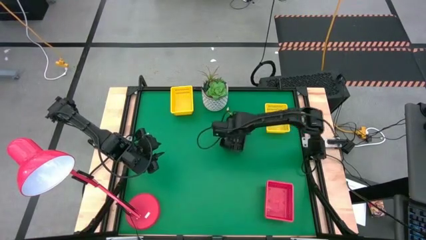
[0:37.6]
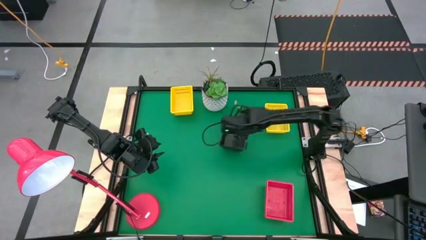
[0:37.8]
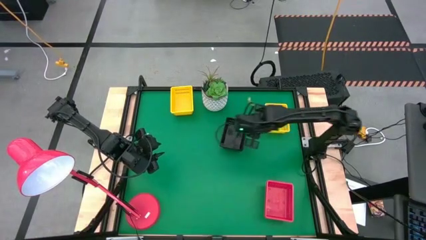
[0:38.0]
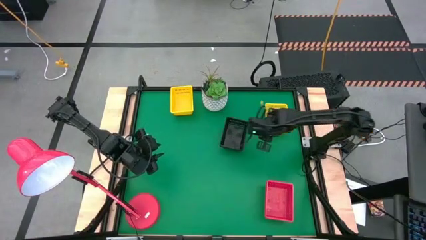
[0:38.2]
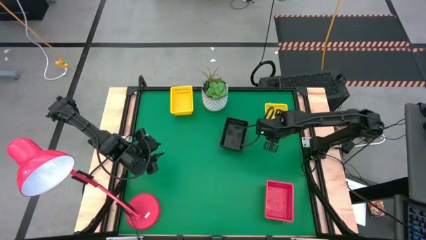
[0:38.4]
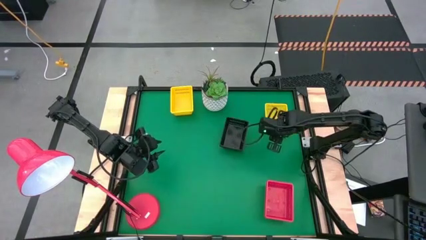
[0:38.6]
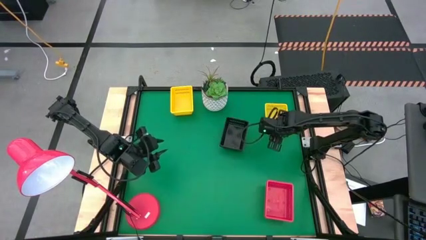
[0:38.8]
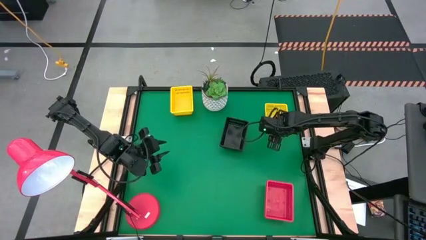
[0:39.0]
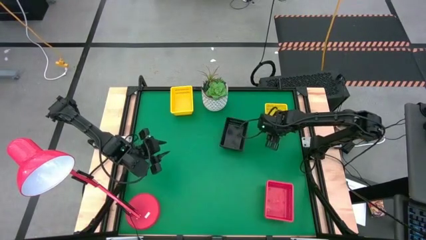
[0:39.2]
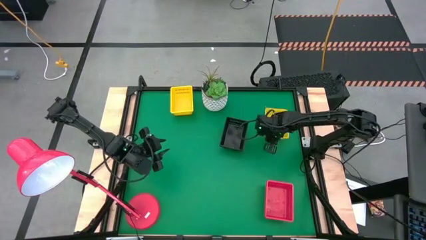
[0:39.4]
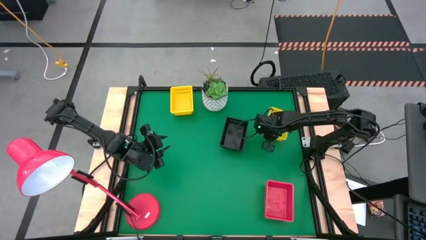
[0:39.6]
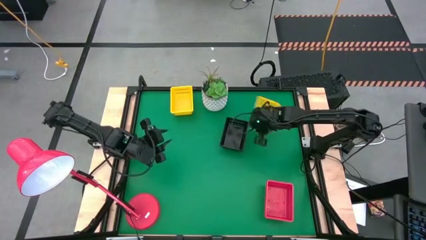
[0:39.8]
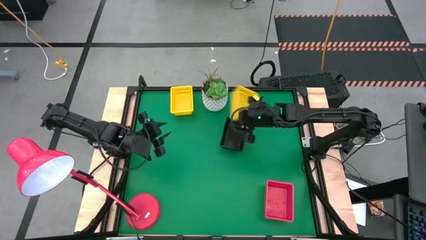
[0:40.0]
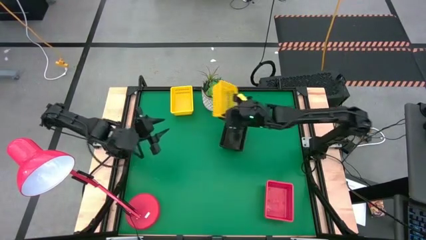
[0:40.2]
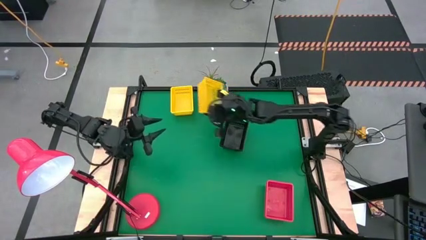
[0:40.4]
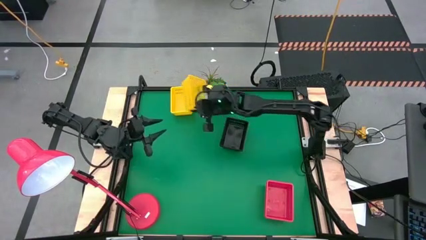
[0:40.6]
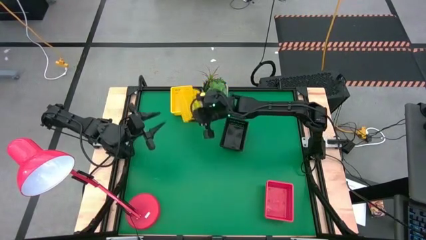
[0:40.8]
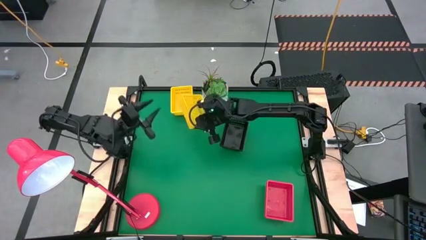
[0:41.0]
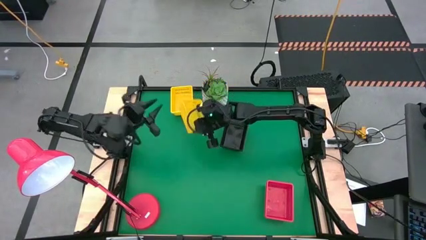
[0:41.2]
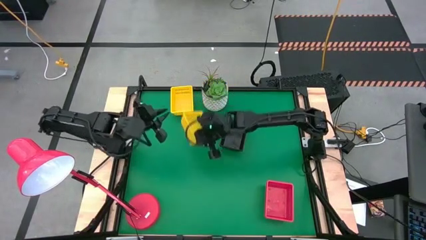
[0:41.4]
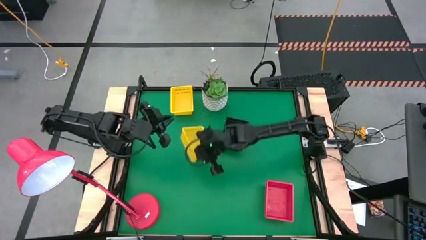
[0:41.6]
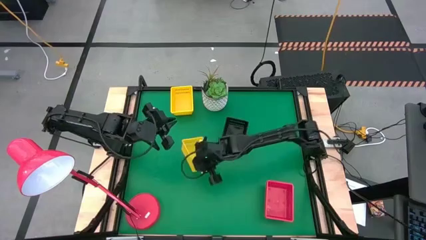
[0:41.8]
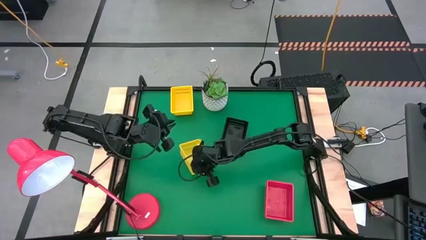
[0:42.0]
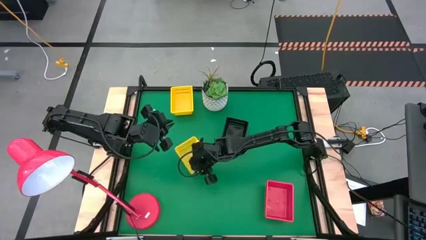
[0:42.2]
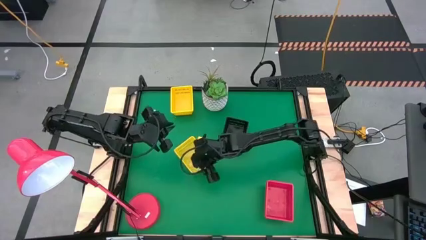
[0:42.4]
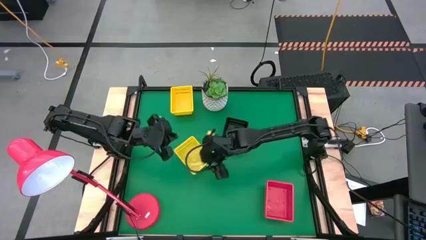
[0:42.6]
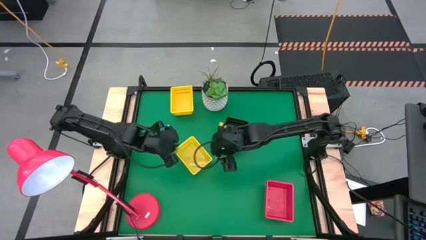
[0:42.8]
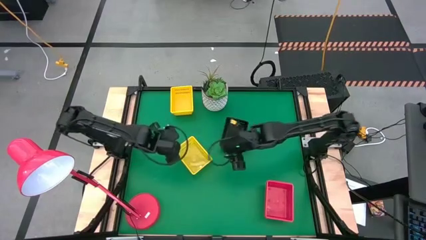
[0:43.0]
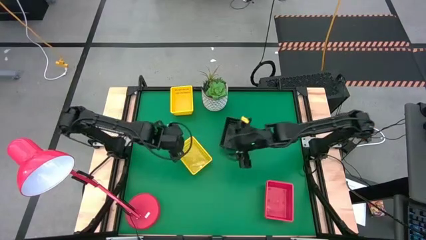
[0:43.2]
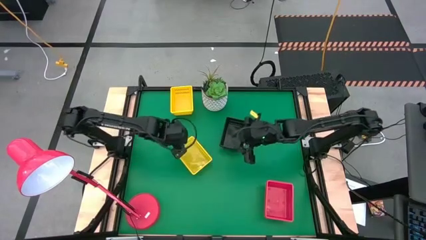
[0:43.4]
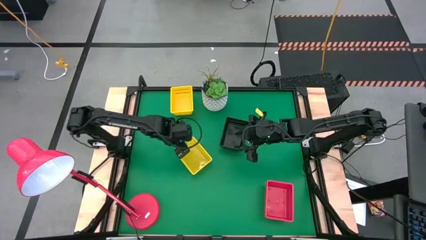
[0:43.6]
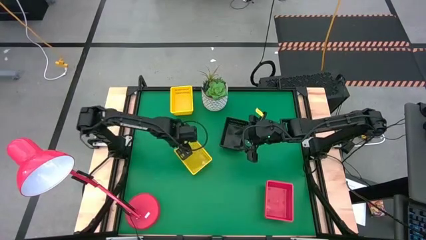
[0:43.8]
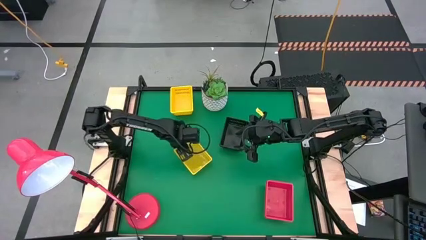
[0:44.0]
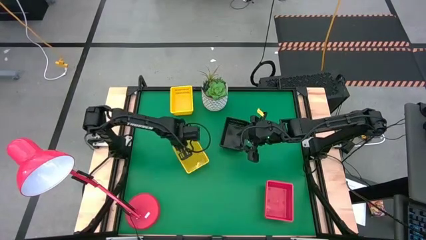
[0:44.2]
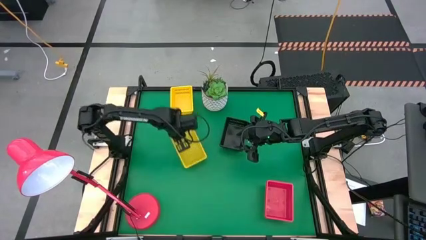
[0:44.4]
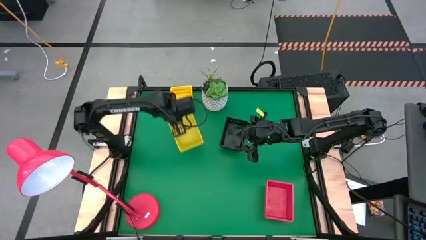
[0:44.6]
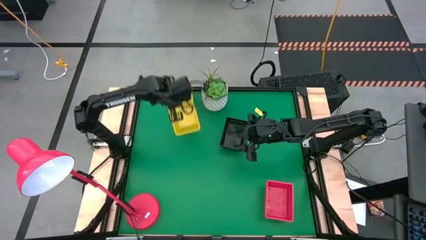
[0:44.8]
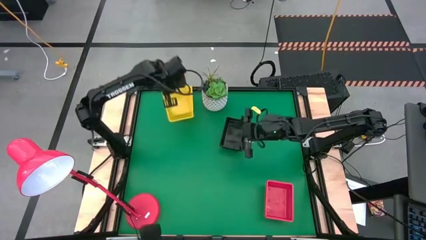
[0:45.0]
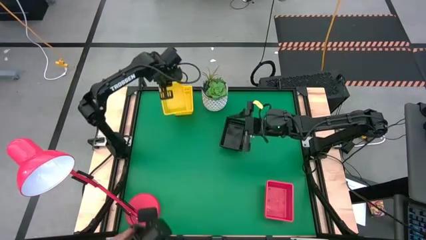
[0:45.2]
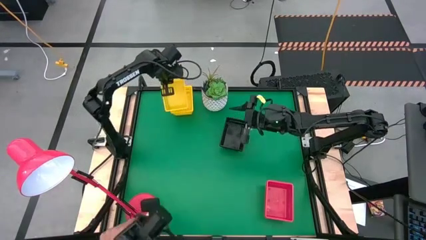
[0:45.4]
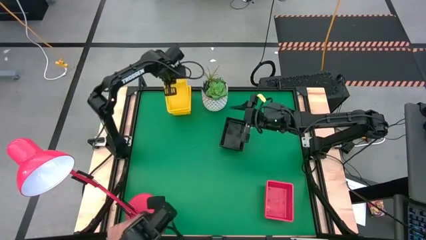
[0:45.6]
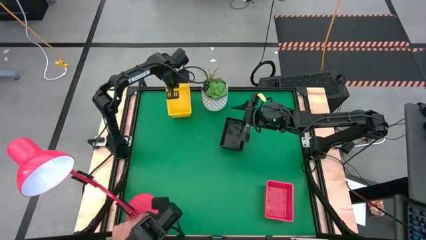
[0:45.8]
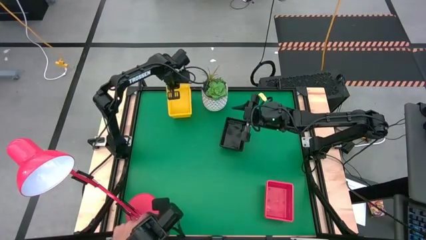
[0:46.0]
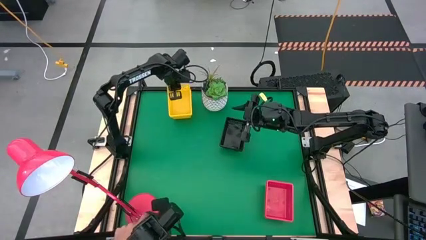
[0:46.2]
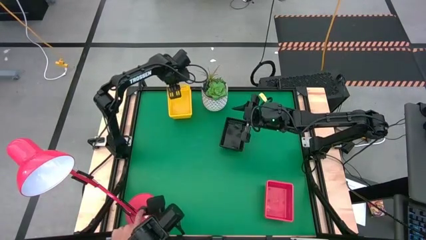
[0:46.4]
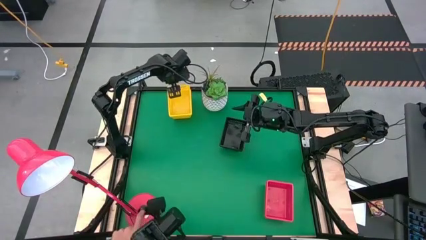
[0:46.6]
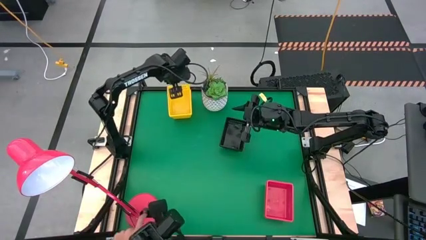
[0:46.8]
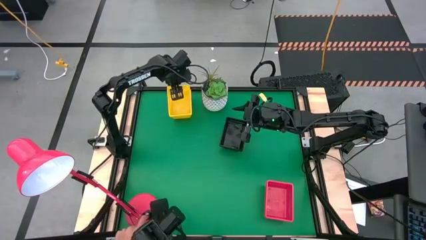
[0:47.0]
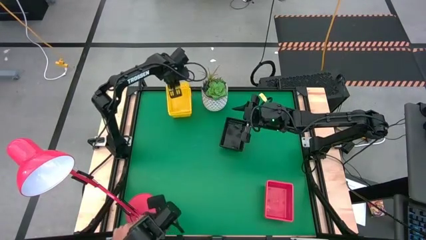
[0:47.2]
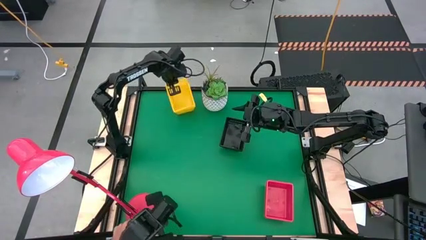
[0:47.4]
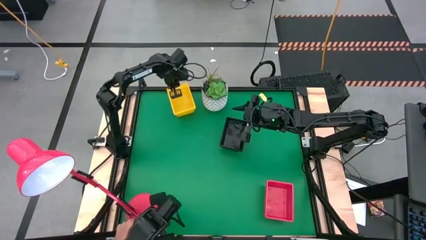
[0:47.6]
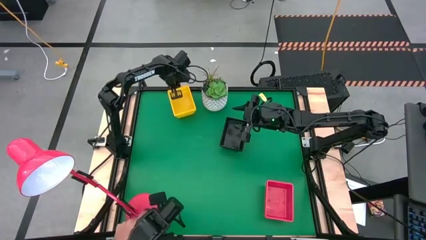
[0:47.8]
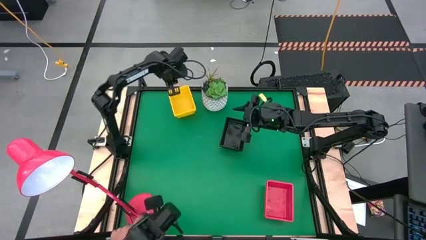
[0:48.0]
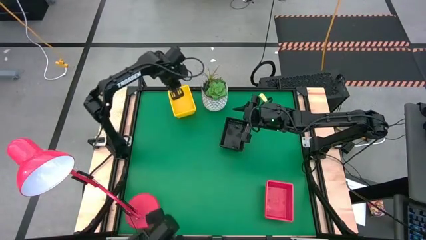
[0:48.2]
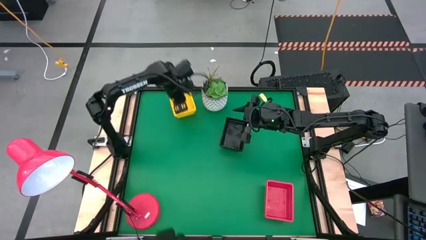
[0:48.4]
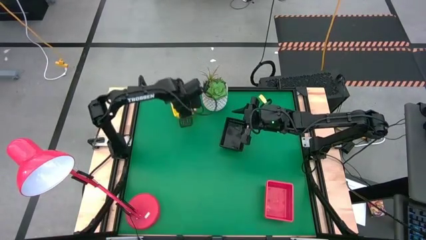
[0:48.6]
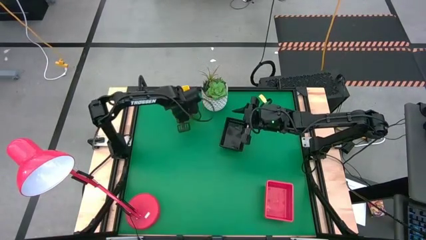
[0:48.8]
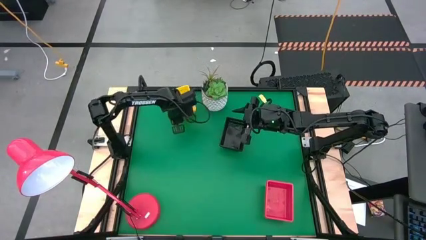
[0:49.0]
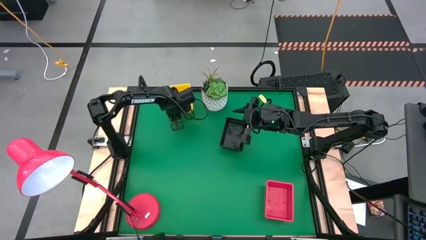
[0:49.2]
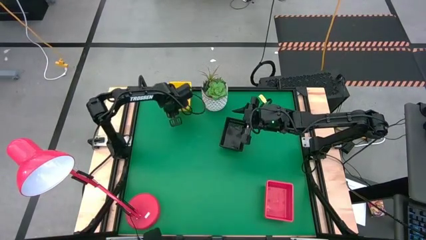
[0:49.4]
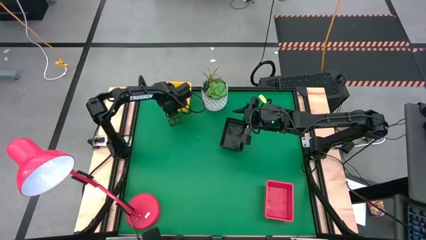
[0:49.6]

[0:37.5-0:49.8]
Stack the right yellow bin on the left stacked yellow bins

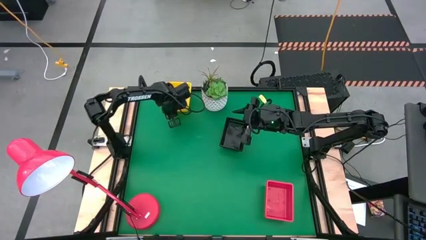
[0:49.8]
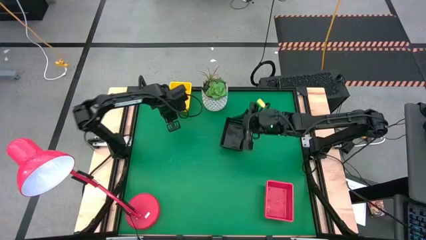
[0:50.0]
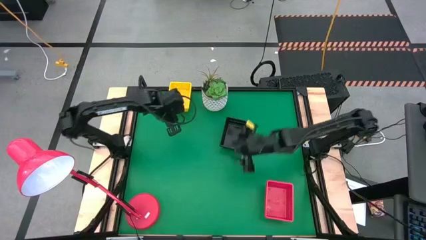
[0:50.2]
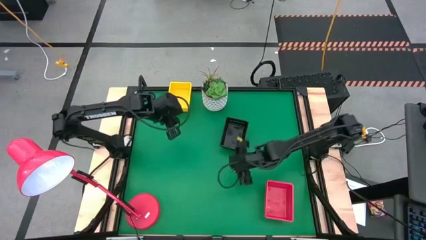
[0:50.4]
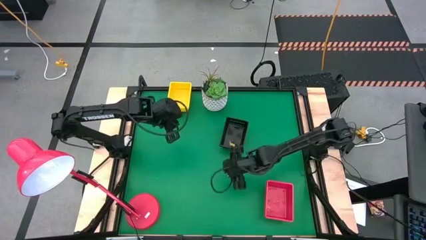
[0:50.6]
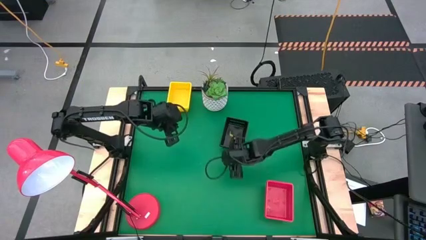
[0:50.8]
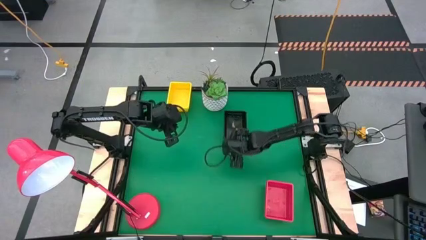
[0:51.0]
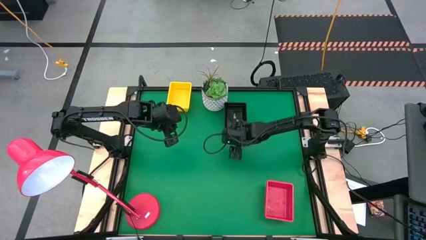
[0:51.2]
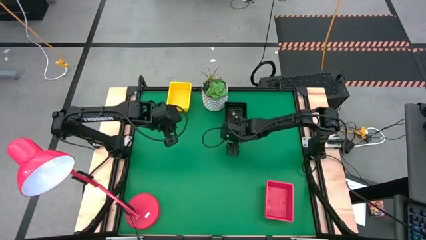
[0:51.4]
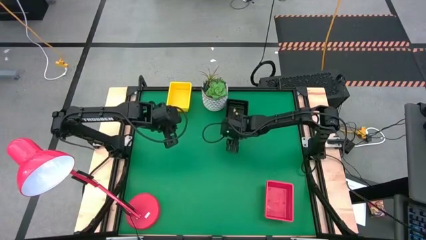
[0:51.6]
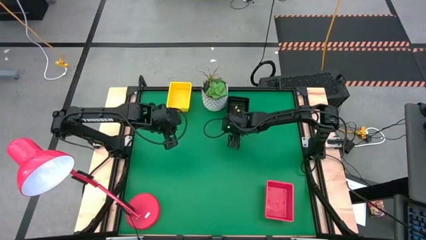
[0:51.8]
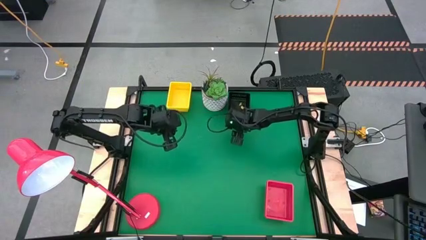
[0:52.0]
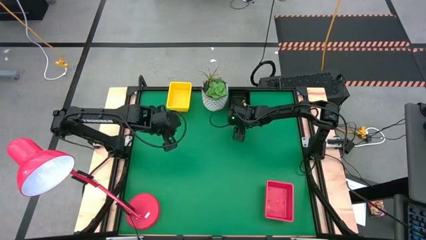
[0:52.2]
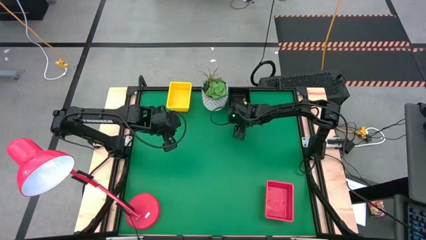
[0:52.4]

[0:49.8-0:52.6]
Move the black bins to the top middle of the table
